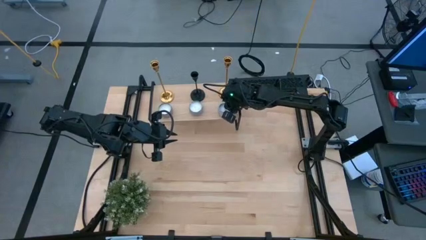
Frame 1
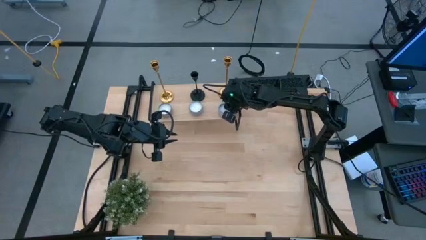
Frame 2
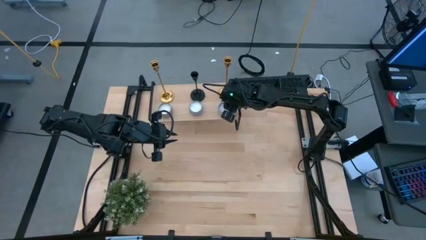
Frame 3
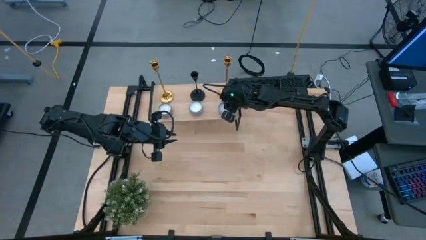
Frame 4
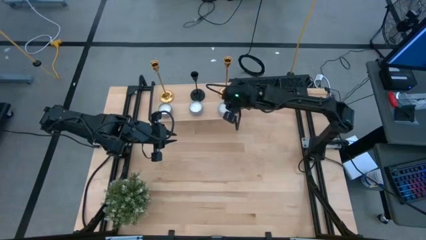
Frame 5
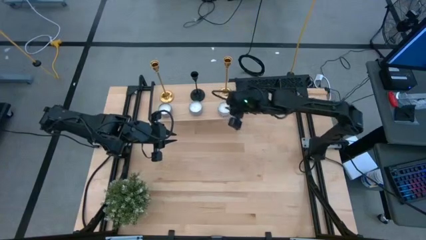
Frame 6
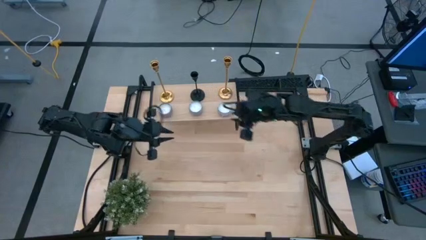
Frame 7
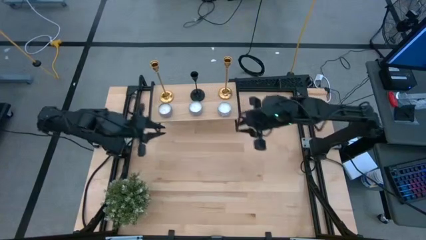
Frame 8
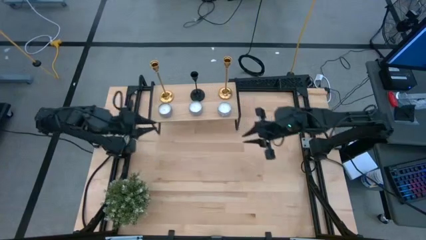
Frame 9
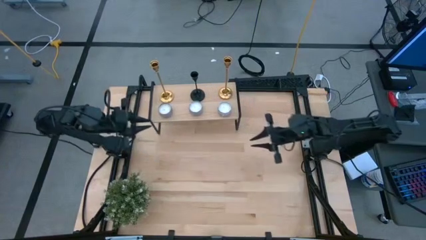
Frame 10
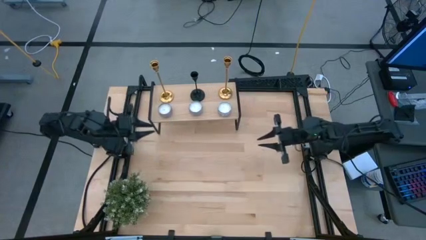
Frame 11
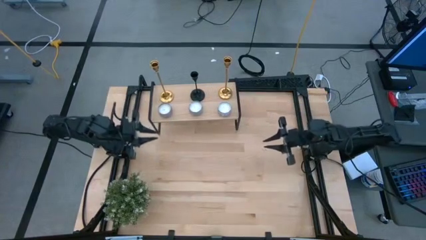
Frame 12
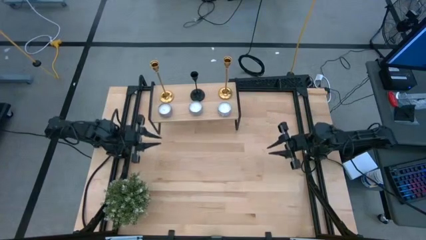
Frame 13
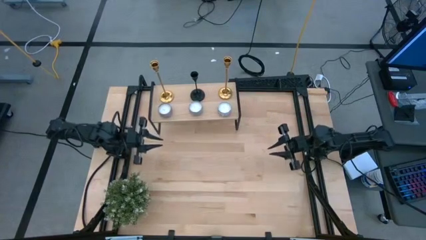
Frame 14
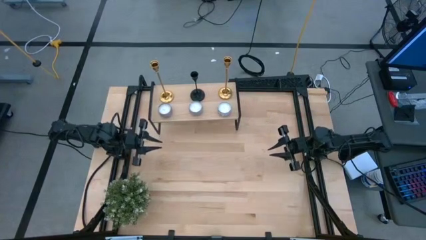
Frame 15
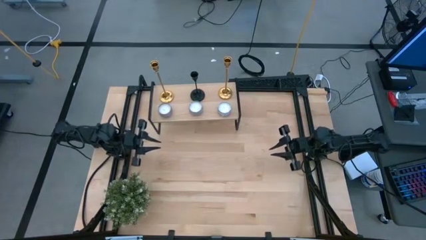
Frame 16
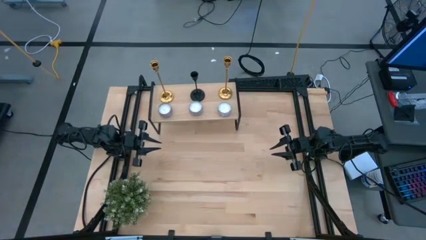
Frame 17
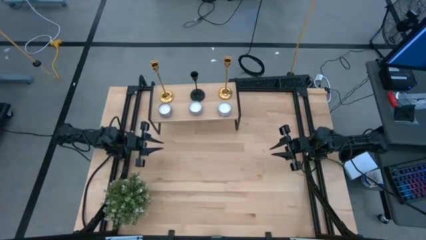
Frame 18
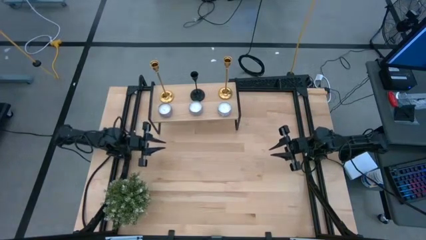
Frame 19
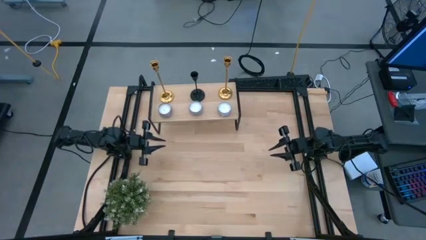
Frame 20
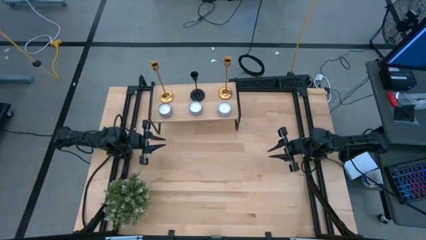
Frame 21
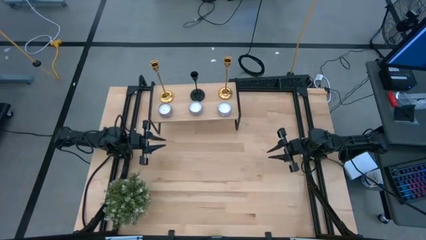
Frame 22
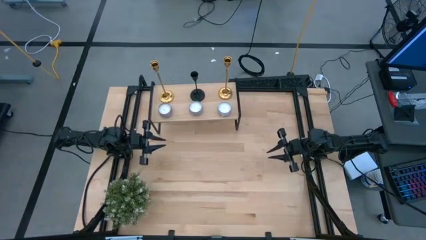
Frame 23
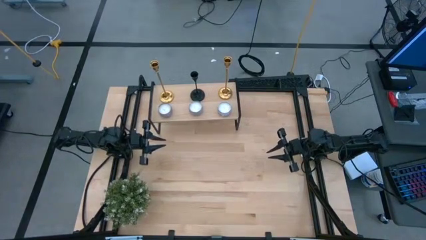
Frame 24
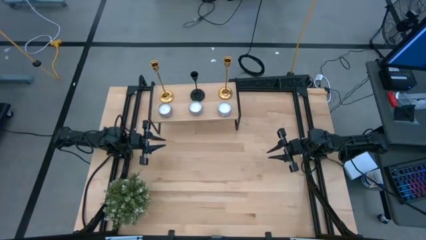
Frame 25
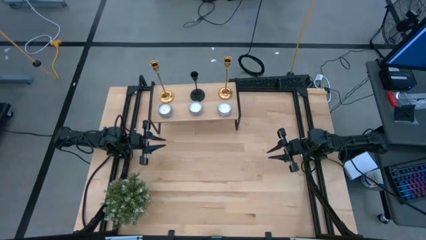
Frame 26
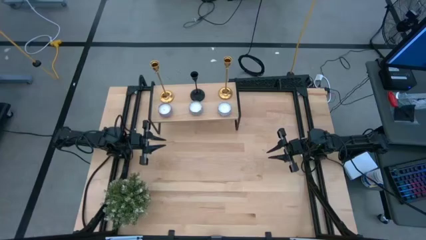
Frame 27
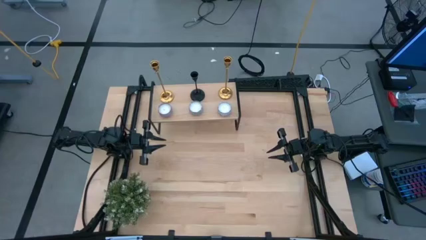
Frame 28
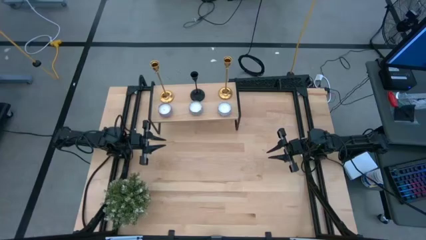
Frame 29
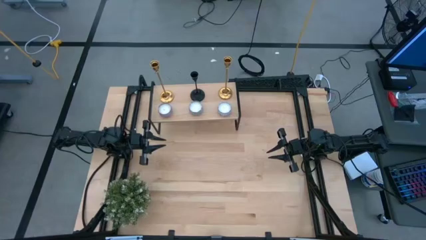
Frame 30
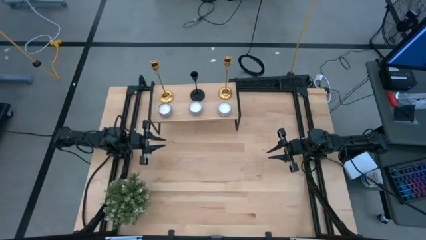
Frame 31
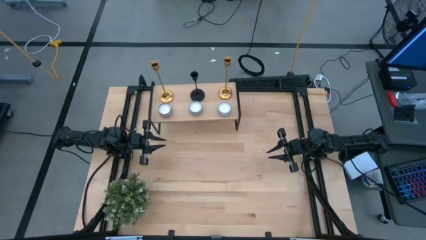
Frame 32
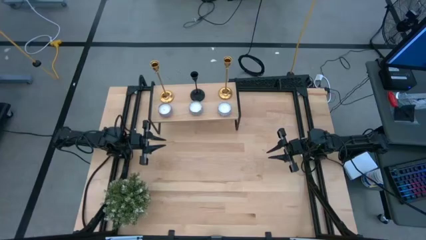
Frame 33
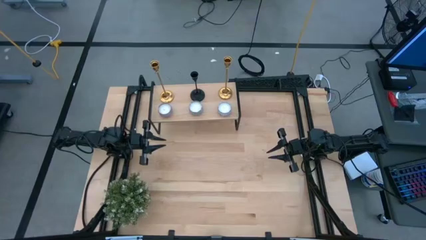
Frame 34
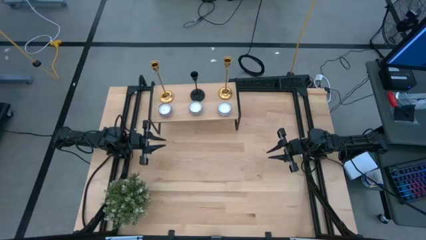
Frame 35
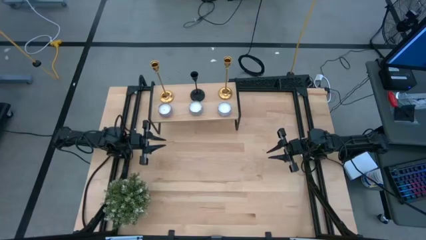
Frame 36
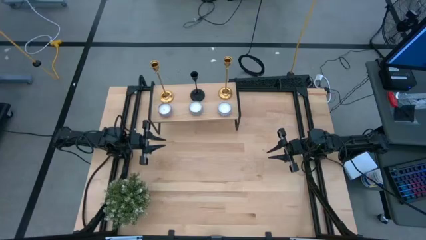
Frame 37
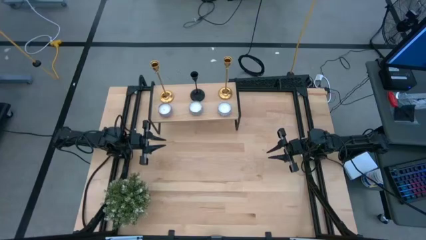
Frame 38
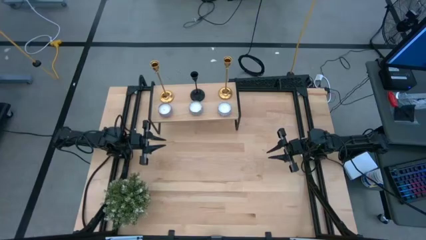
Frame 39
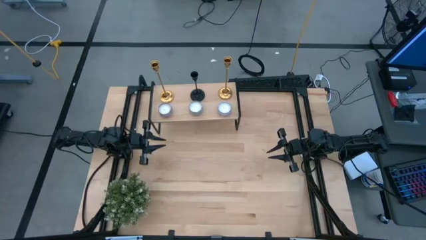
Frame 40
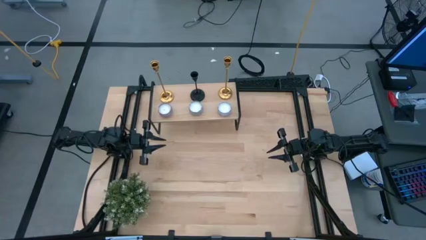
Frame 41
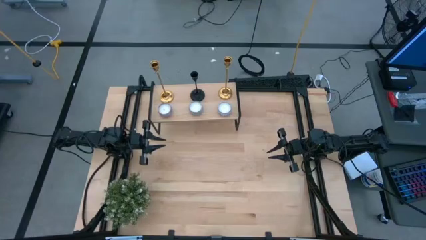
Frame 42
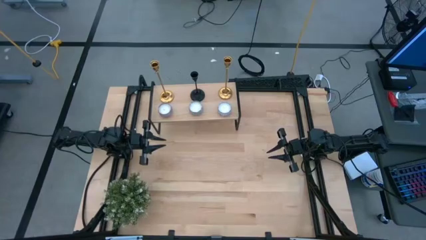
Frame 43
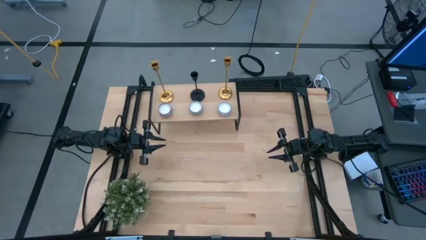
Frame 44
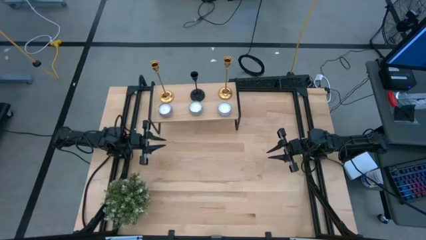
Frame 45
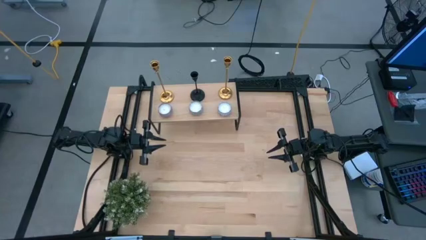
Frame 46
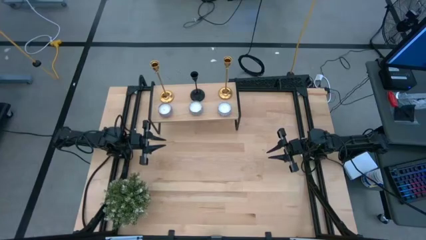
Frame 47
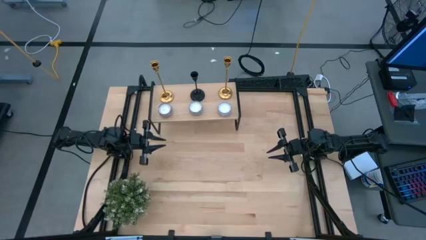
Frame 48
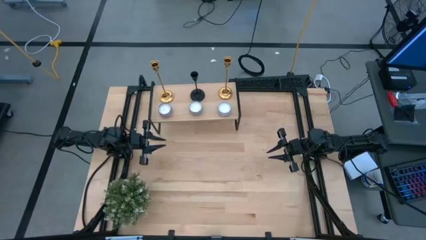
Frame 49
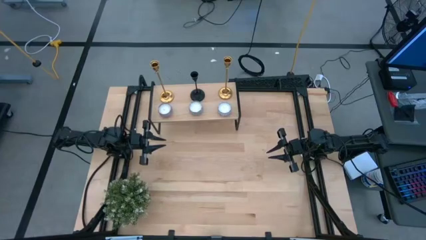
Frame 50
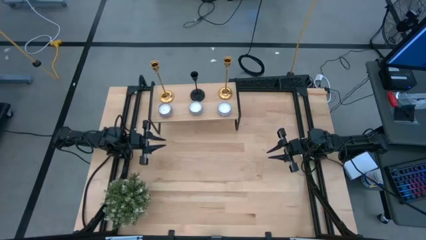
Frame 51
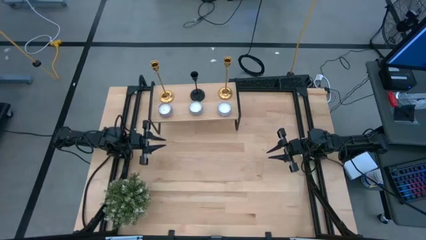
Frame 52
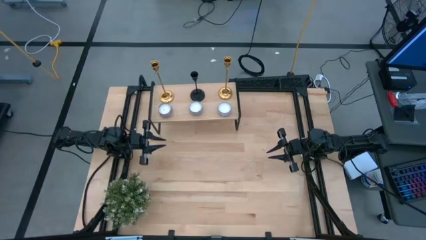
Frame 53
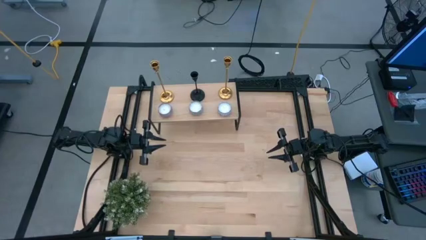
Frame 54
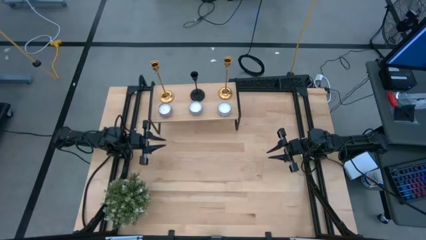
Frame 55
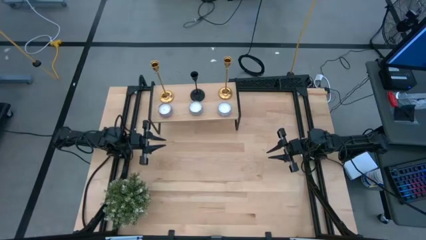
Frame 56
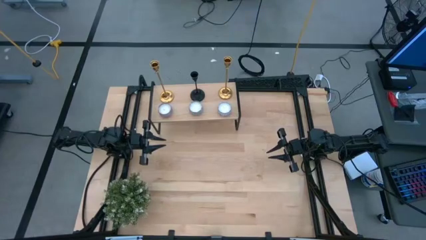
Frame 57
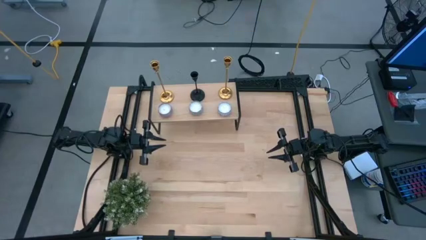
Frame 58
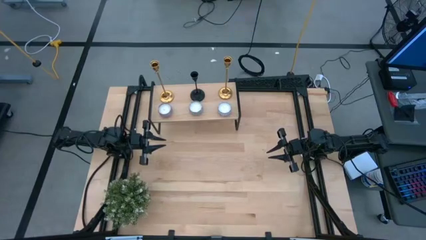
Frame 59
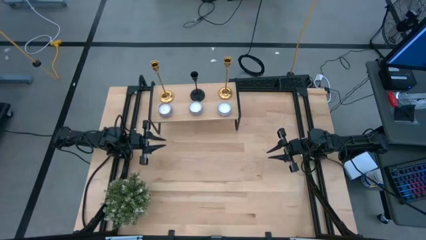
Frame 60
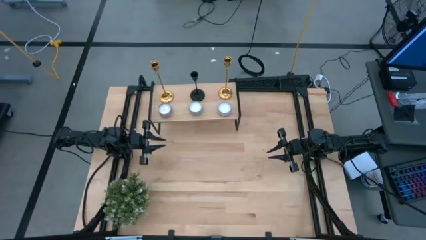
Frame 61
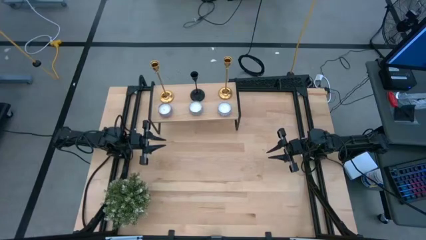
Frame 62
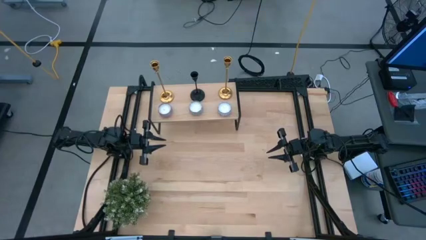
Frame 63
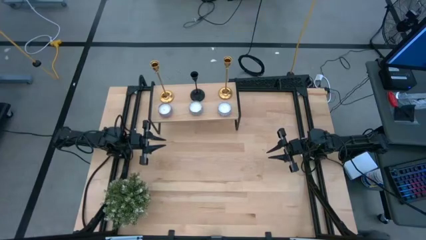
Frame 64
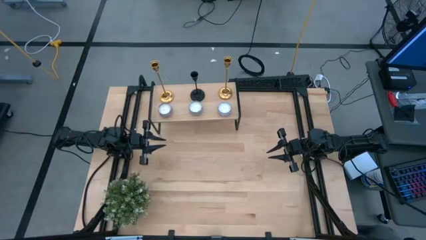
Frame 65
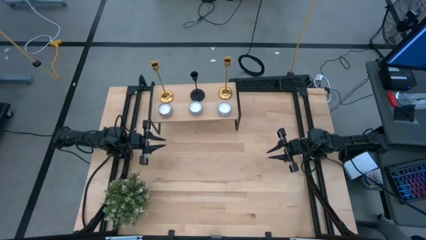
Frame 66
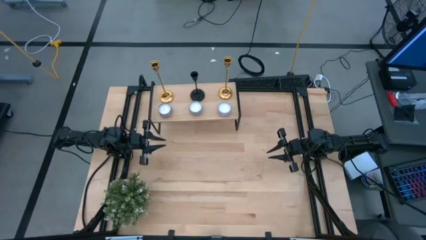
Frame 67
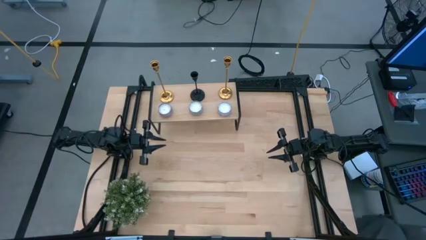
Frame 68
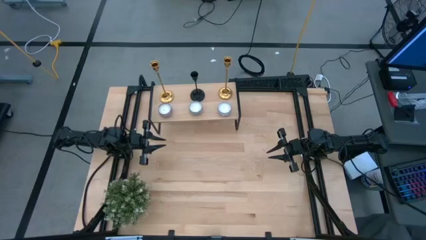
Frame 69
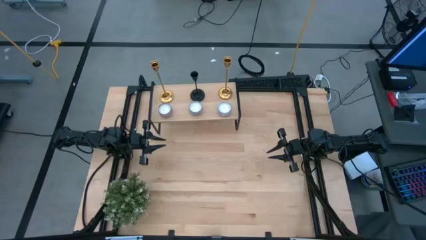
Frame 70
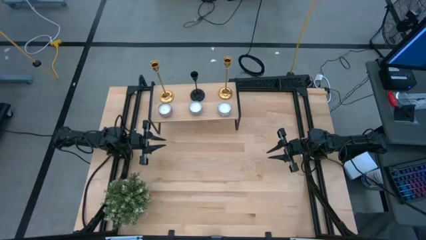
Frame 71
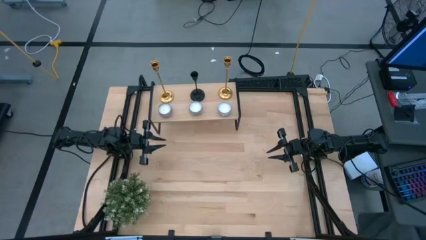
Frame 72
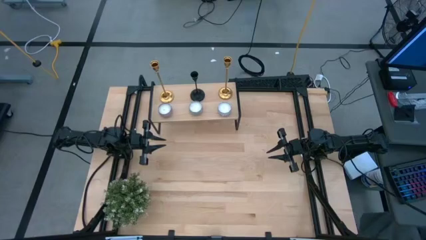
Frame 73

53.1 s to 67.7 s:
Task: Pick & Place candle stick holders
Return to Home Position

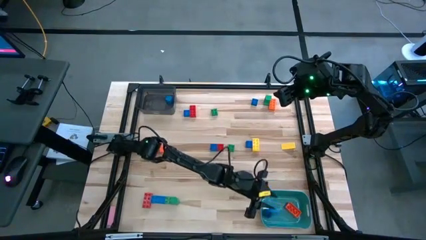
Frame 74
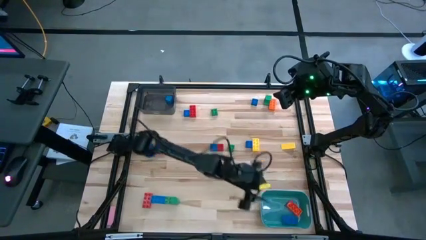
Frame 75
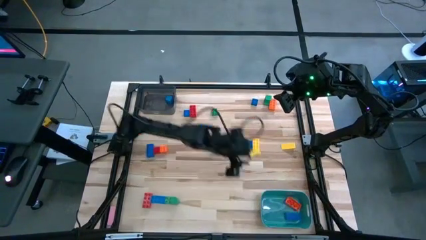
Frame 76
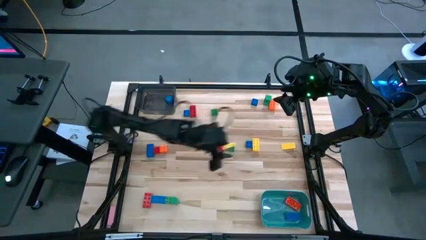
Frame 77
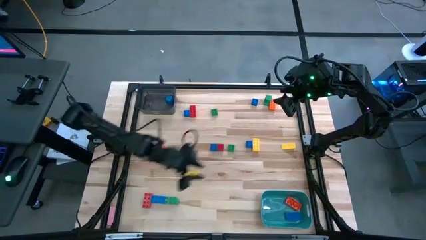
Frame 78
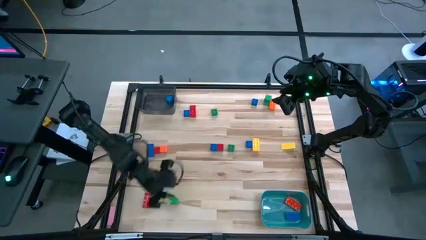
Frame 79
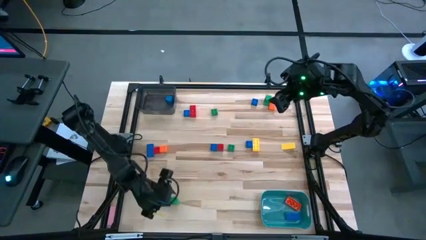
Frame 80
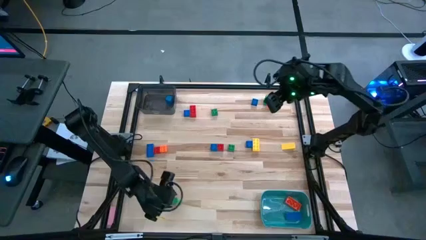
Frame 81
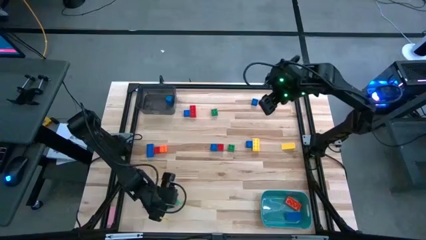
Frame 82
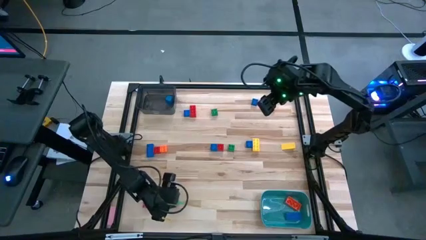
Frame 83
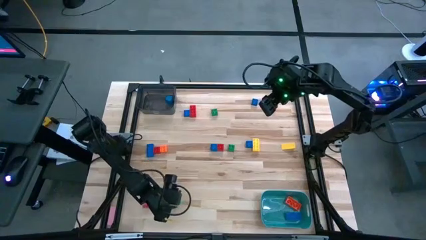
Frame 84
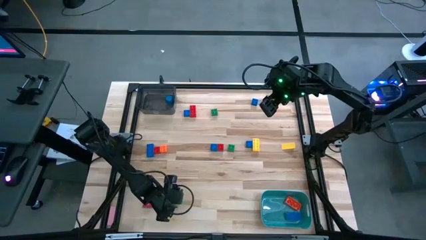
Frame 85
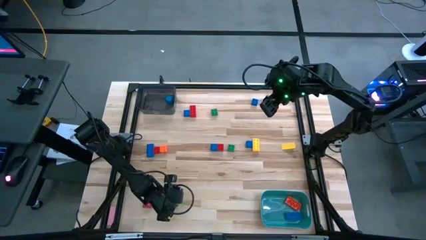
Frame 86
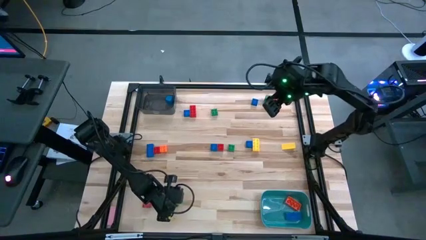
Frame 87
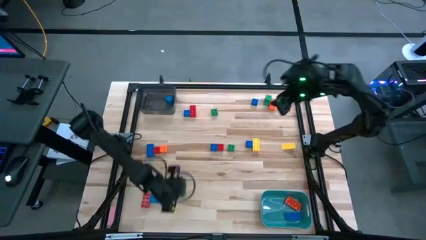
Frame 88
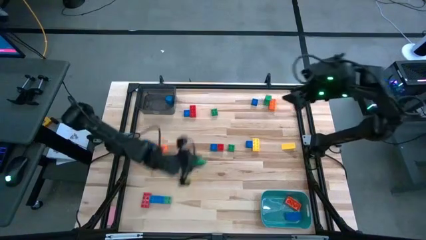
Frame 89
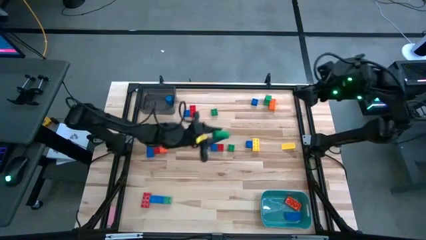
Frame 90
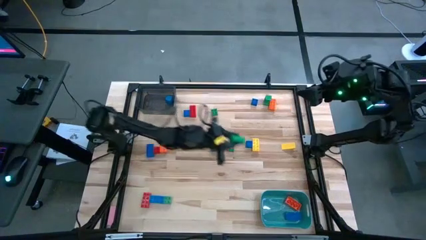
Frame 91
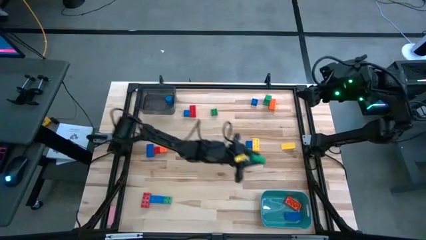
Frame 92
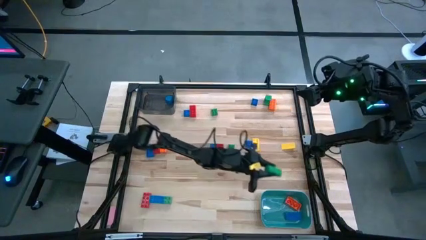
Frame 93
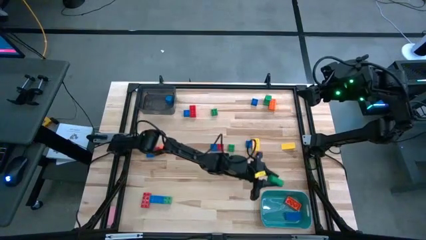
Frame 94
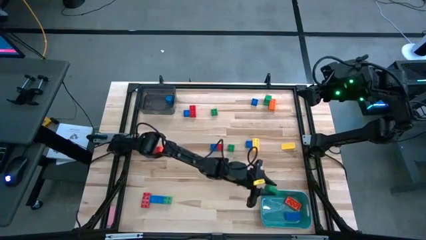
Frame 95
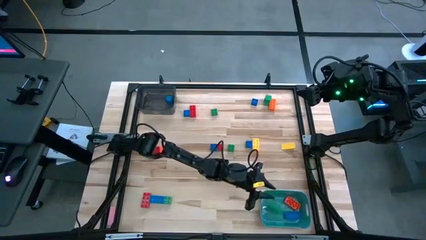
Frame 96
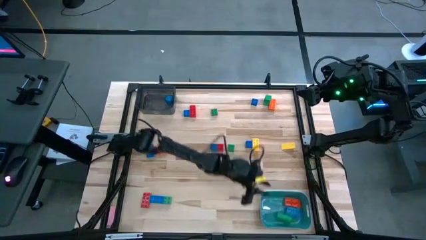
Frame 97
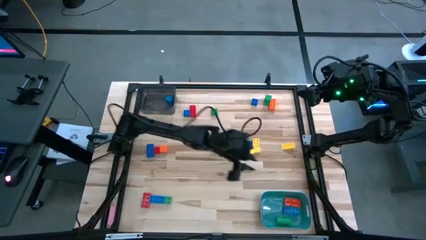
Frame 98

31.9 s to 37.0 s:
Task: Sort blocks by size
Put the right green block into the blue bin
